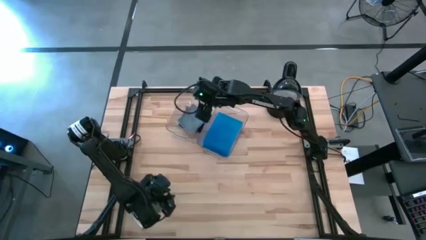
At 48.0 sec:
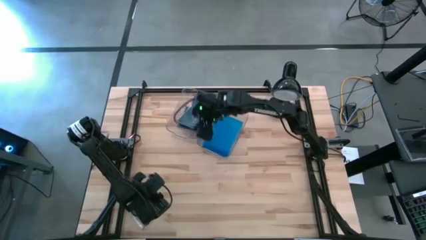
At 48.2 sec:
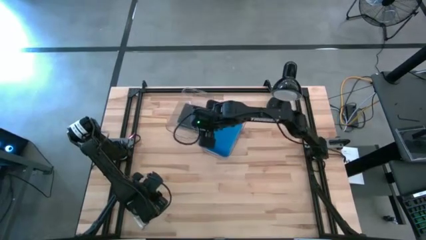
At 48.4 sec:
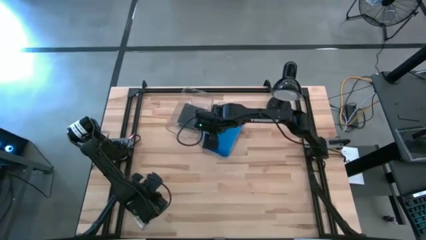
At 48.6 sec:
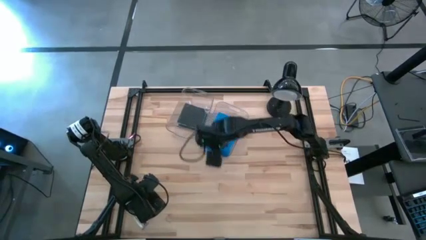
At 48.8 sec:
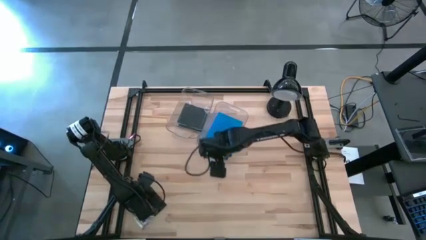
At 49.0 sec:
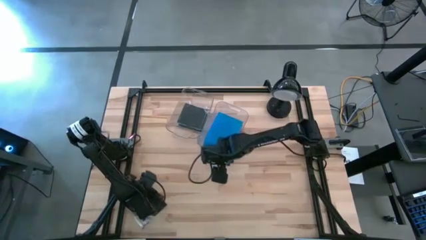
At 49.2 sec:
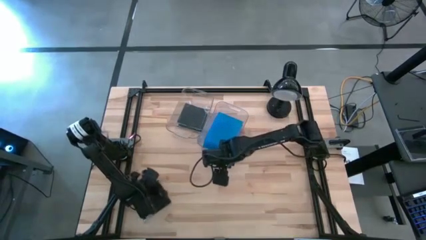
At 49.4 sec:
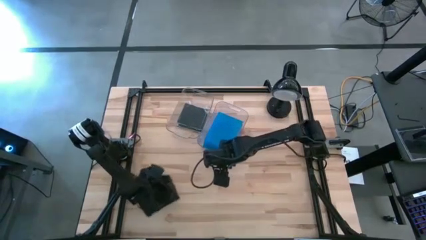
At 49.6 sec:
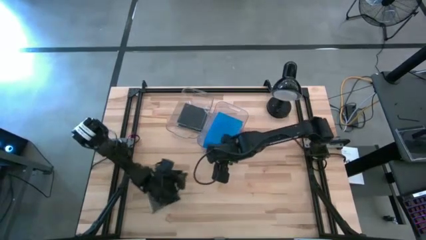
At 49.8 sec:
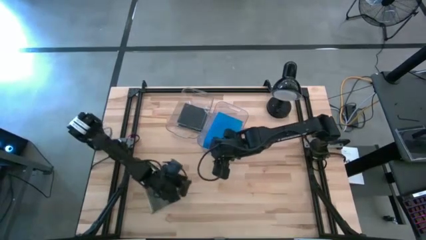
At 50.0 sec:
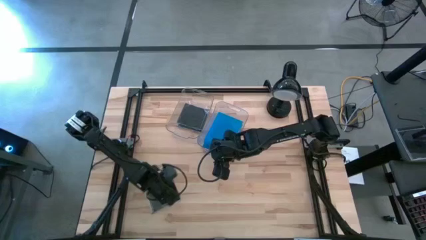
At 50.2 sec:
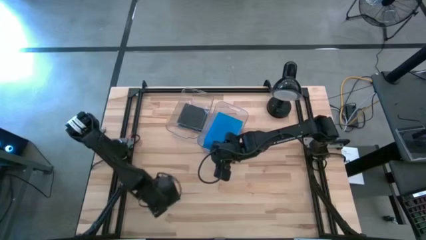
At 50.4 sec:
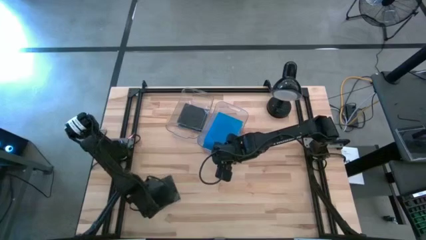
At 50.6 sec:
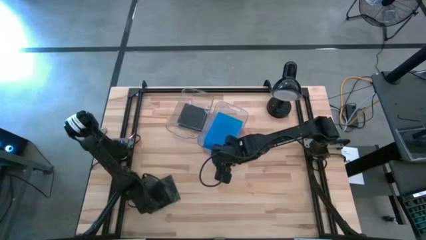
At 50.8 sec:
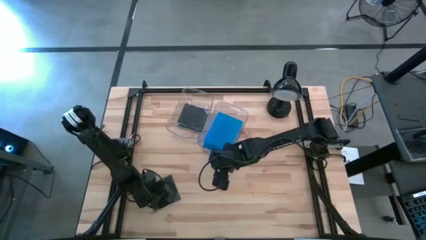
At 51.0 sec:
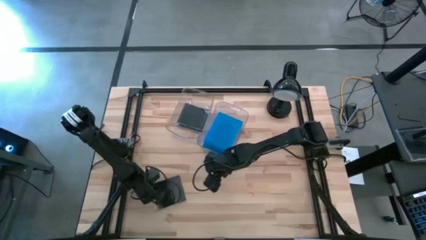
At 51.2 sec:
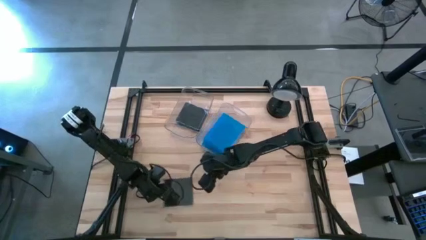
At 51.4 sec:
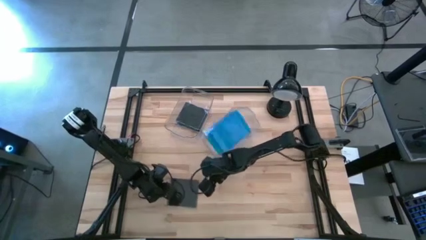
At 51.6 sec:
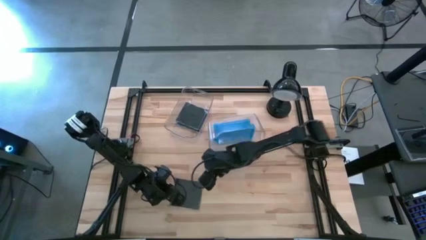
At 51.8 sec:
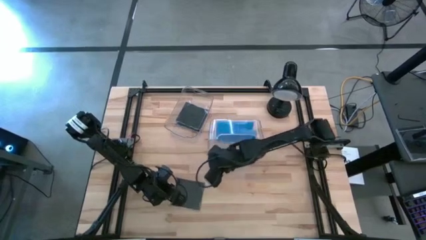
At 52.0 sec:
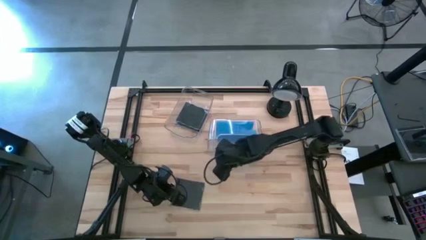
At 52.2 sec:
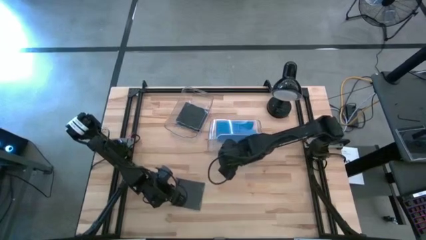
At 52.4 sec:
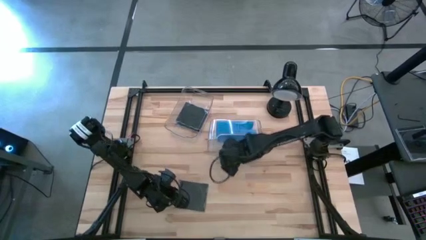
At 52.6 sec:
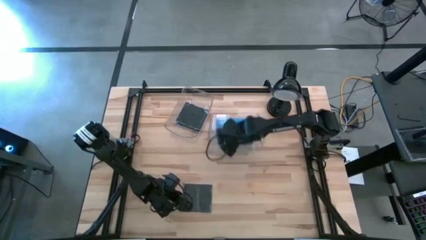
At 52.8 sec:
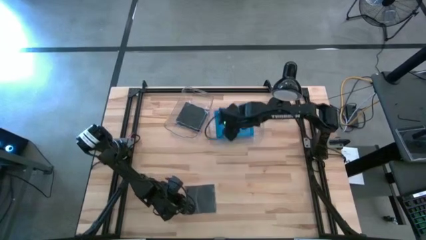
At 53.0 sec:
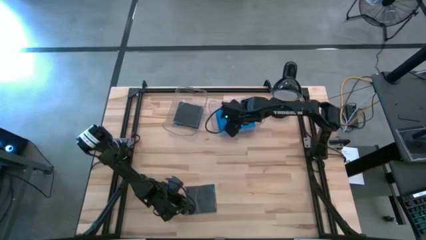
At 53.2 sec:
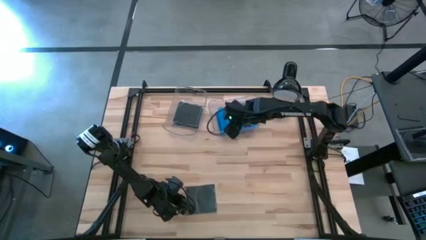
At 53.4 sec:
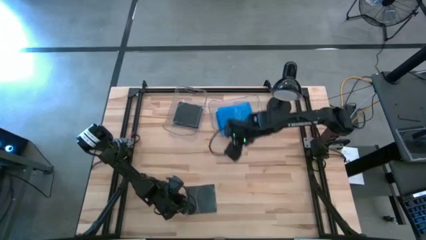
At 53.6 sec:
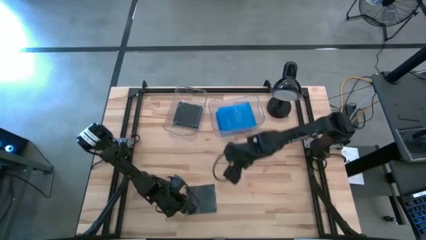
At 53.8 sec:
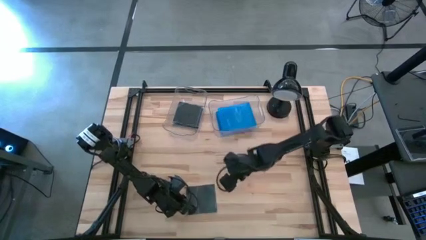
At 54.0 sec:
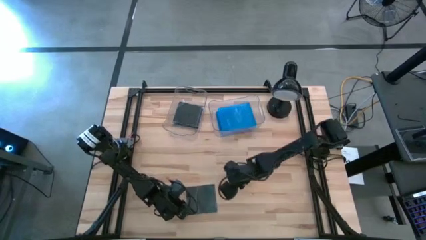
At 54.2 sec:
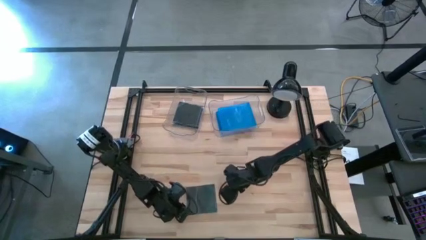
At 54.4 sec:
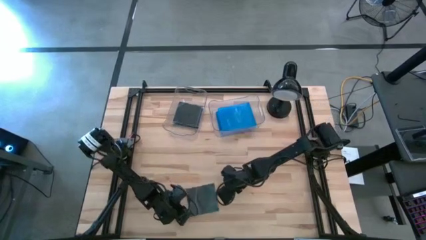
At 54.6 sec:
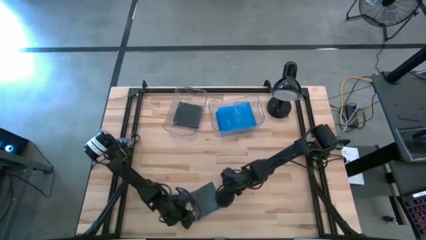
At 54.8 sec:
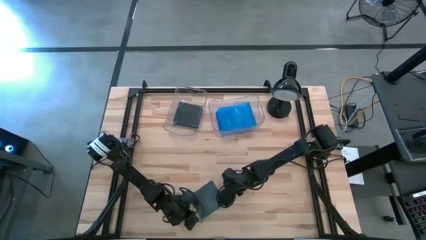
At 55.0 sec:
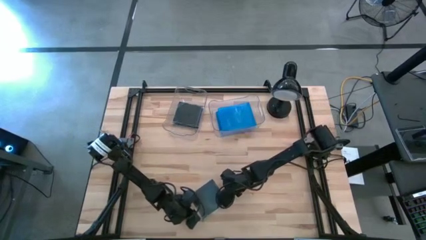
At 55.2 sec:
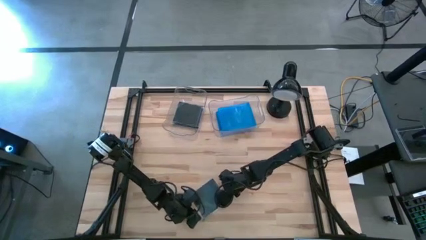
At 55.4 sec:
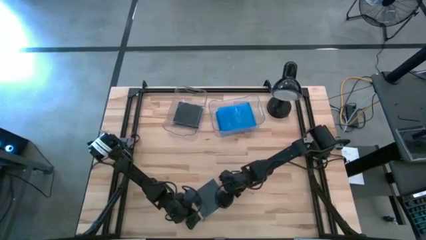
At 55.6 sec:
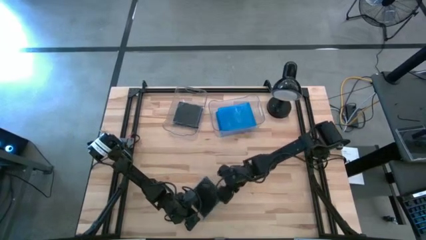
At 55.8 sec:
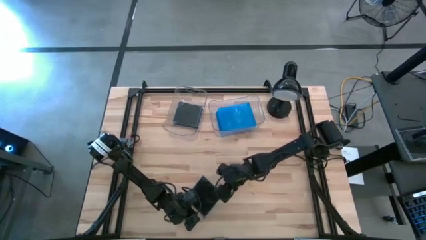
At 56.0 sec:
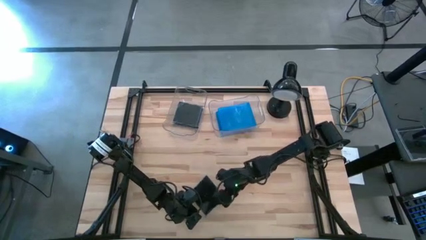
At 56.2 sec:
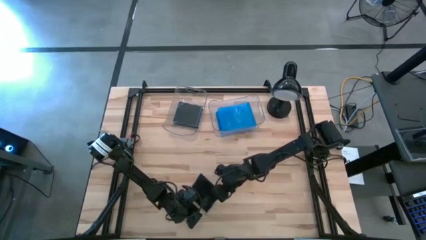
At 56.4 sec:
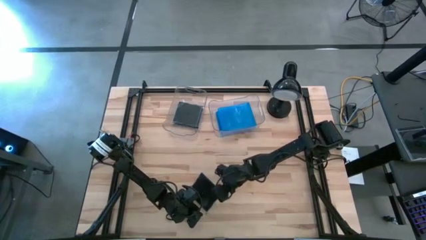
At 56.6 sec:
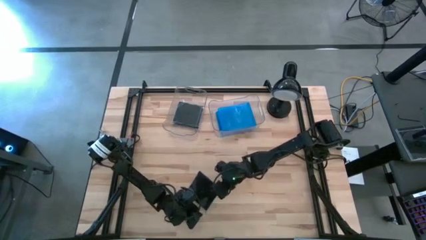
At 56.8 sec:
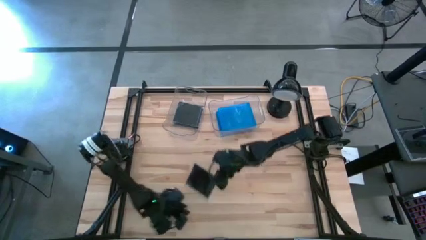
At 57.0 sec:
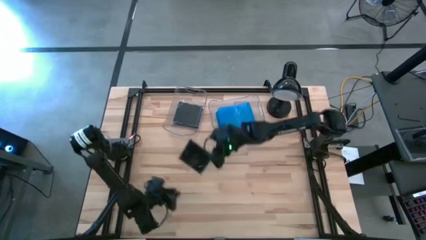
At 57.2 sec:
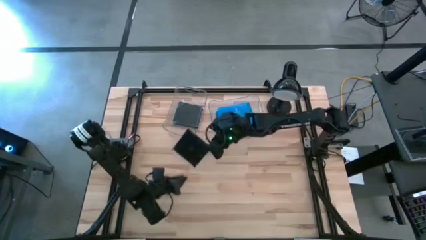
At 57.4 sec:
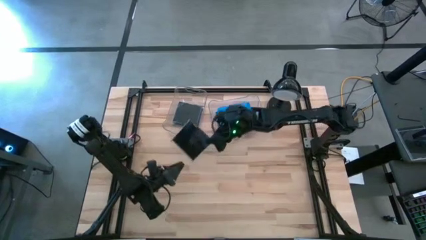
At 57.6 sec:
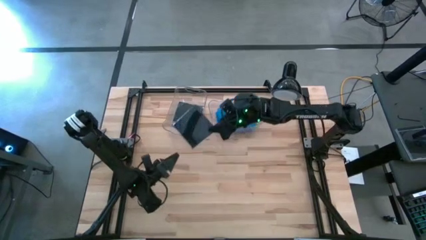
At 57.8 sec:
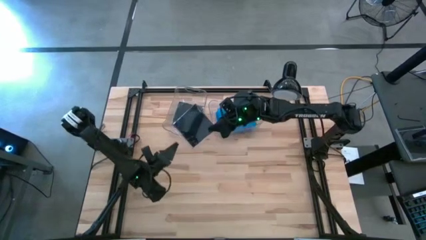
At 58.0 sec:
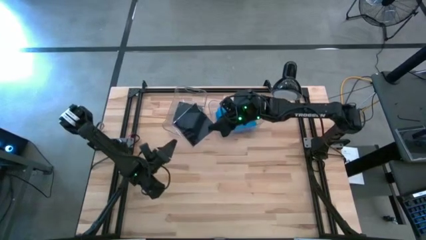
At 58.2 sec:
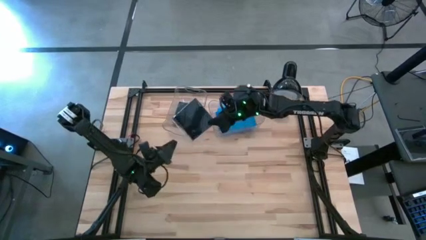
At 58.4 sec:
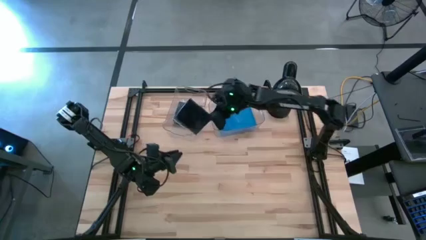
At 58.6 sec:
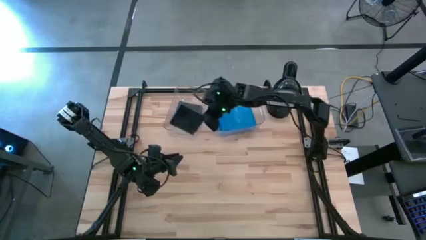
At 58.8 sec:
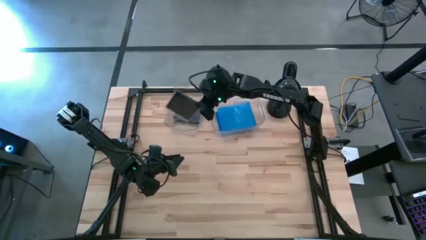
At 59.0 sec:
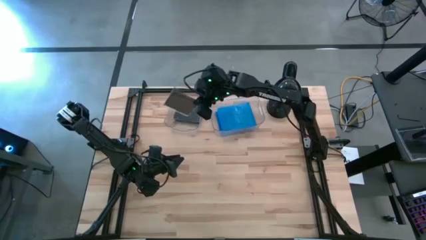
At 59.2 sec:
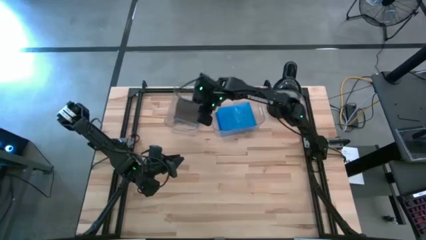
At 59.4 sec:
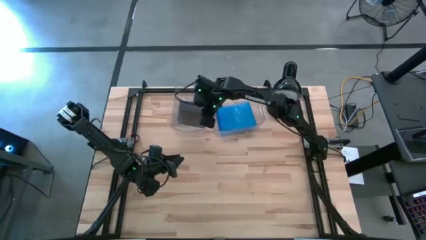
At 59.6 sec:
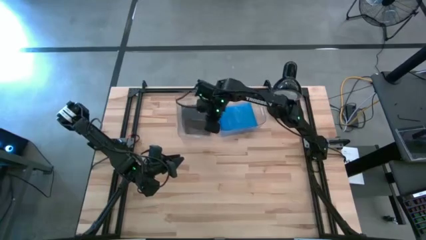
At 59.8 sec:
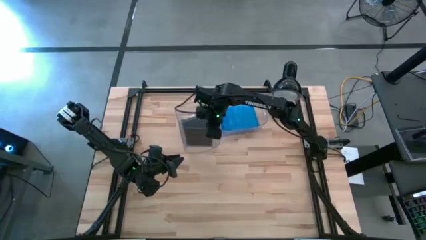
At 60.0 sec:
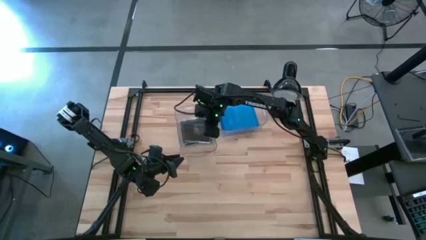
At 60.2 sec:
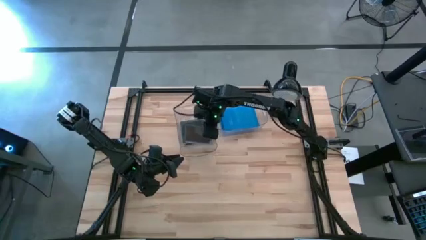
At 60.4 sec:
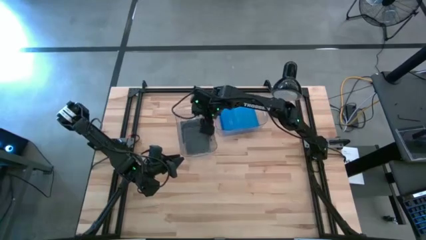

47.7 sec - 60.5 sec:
Task: Pick & place jewel cases by type
Put the black CD case into the left transparent bin

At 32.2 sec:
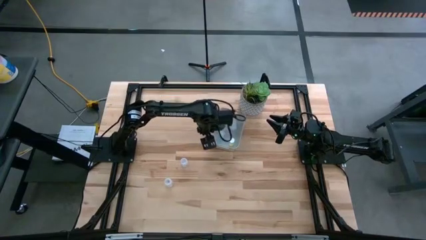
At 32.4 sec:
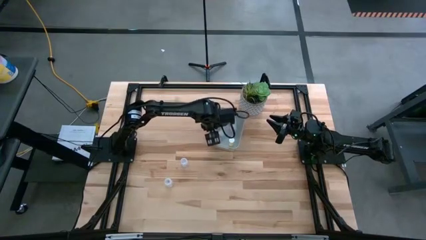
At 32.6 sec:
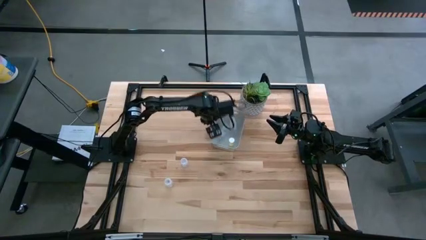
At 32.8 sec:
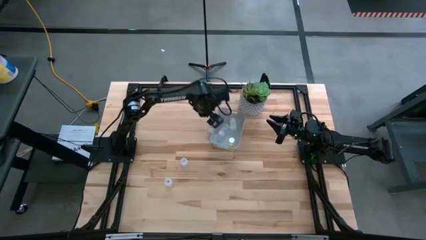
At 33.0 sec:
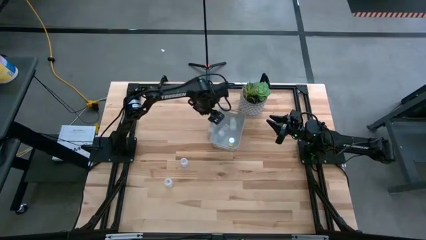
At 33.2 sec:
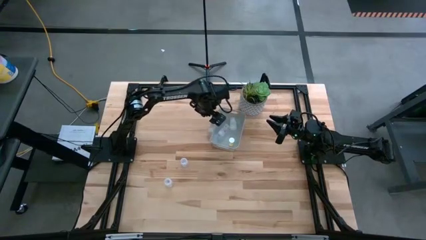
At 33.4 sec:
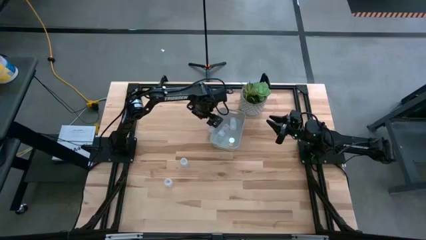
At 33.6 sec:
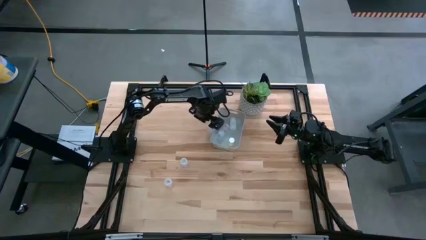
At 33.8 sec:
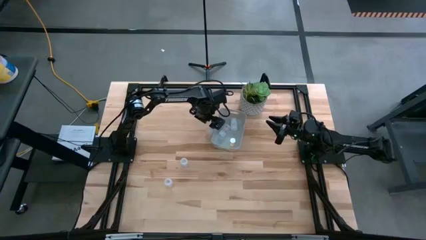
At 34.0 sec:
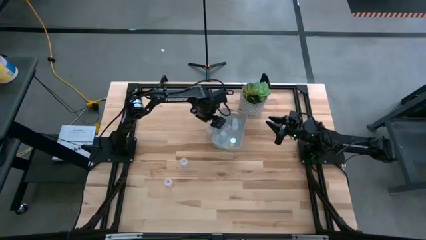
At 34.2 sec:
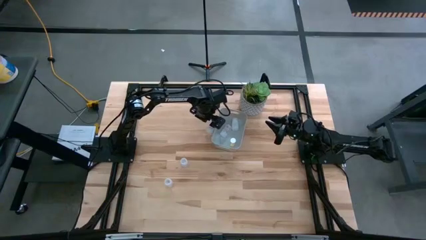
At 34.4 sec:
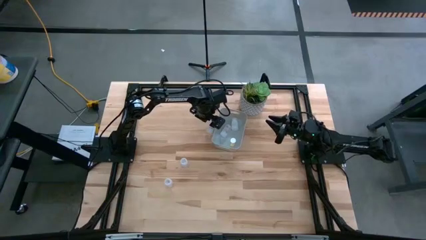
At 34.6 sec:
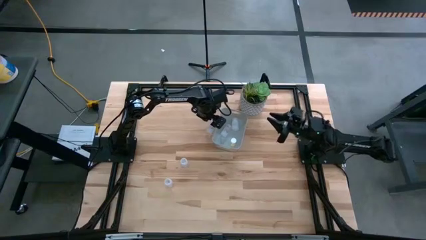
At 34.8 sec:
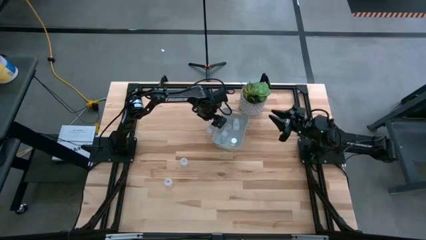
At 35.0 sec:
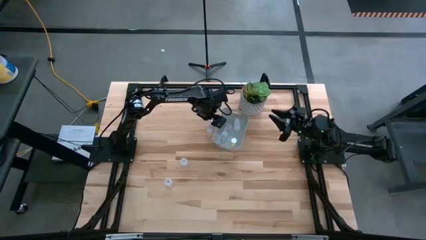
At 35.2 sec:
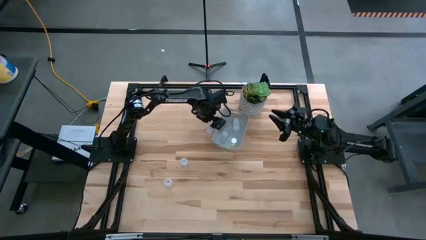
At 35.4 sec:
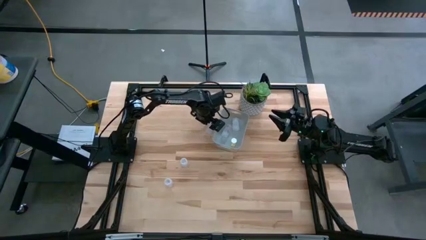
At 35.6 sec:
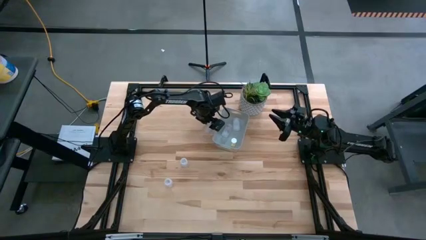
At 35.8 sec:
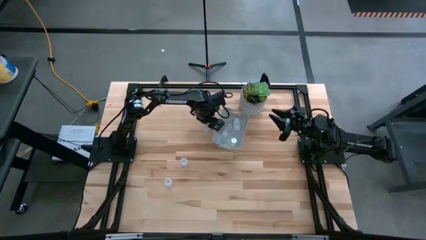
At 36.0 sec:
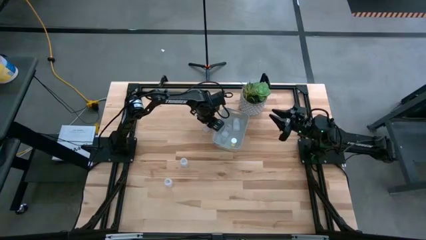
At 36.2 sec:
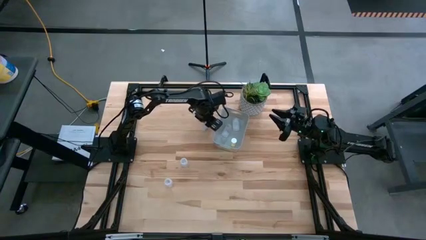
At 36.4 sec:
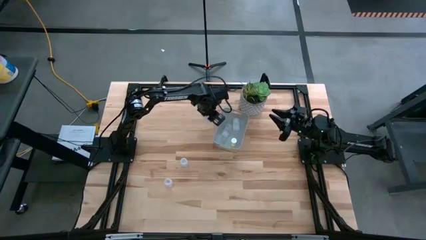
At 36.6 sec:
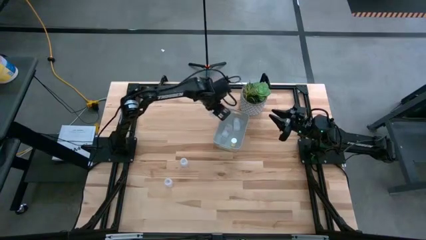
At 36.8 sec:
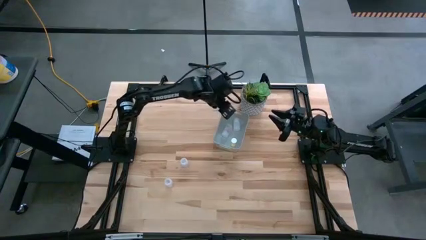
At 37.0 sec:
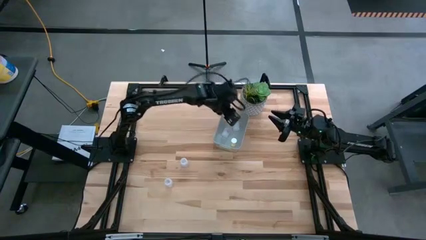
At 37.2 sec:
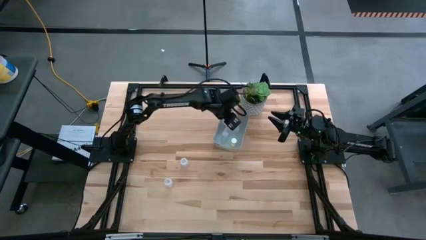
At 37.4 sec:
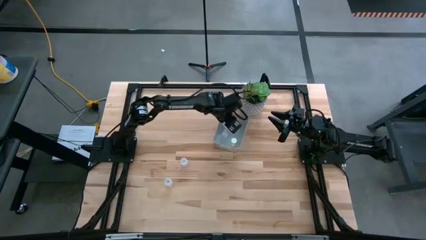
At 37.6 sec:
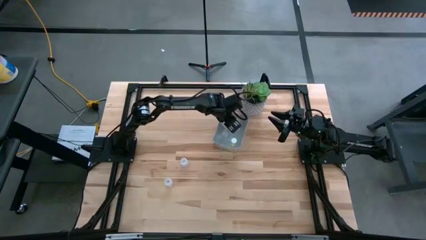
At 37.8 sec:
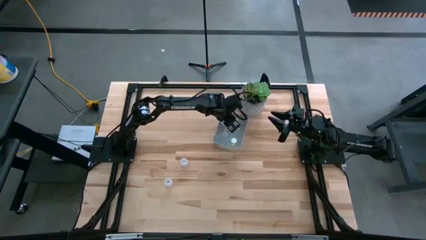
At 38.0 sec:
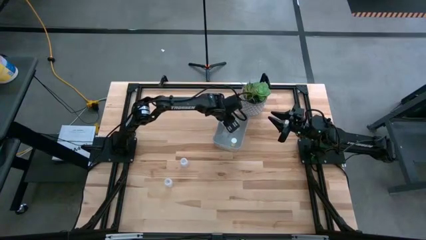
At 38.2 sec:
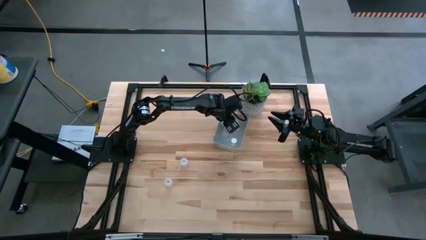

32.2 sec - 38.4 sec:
Task: Pick and place pill bottles into a basket
Put the transparent pill bottle into the white bin
